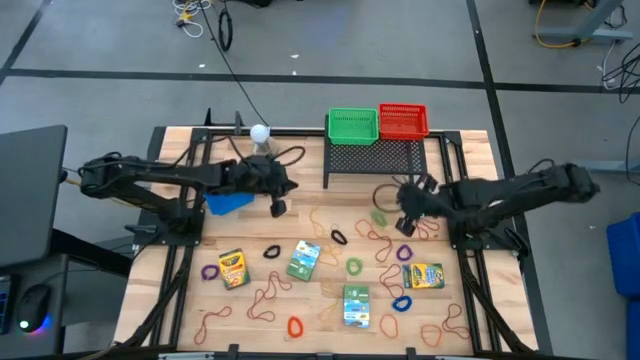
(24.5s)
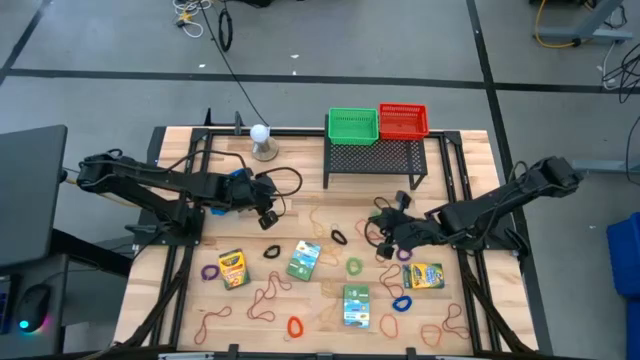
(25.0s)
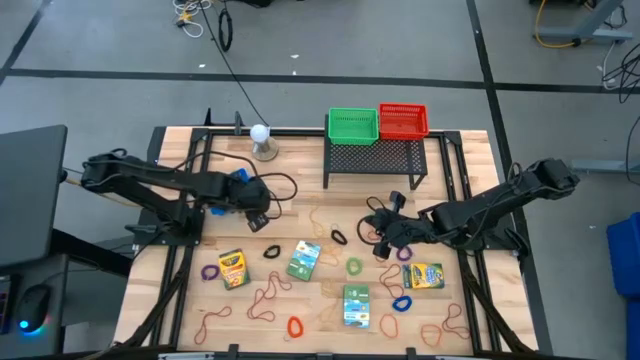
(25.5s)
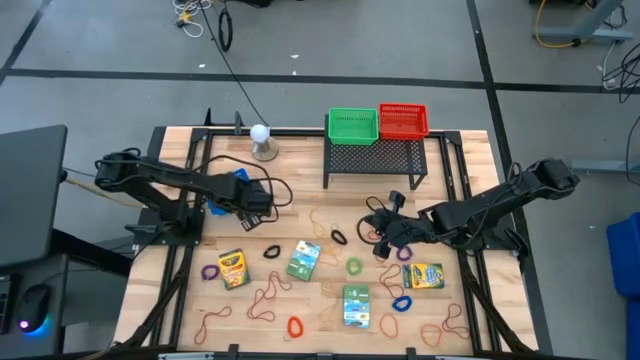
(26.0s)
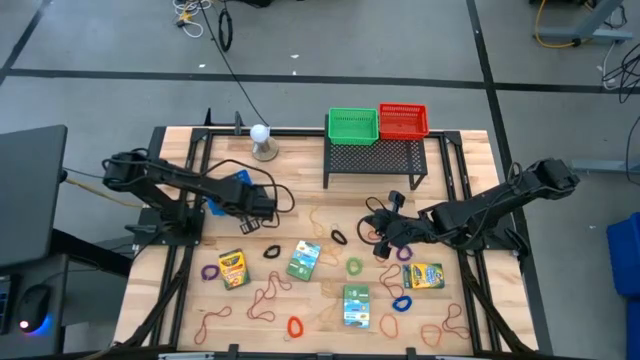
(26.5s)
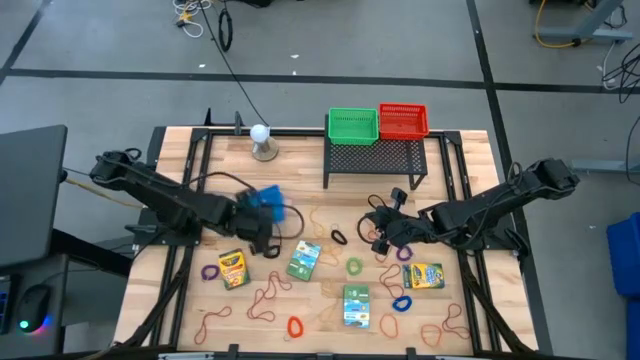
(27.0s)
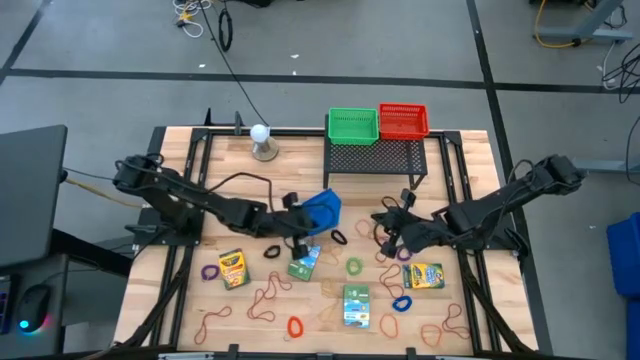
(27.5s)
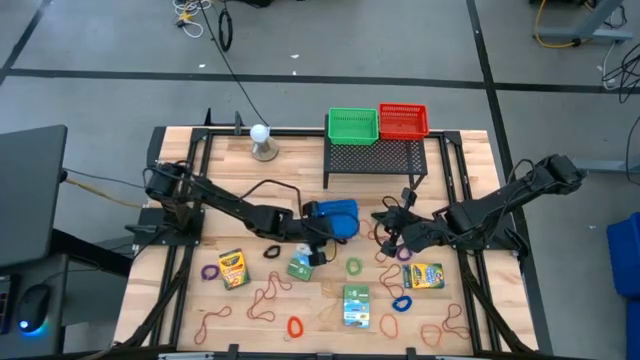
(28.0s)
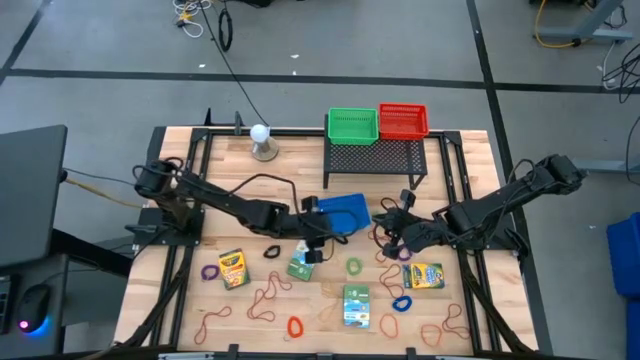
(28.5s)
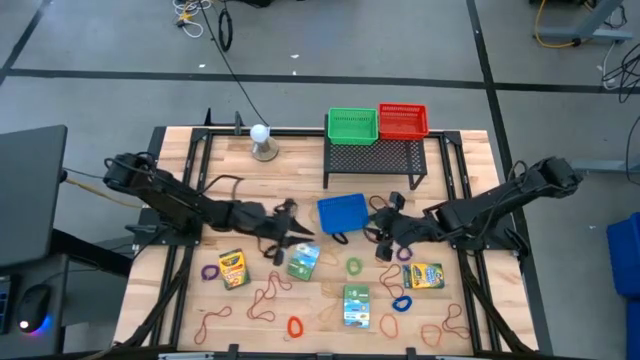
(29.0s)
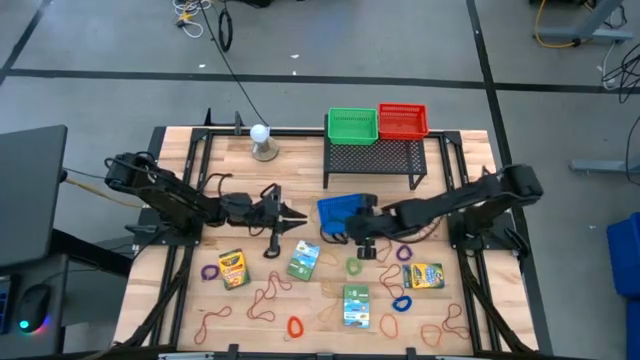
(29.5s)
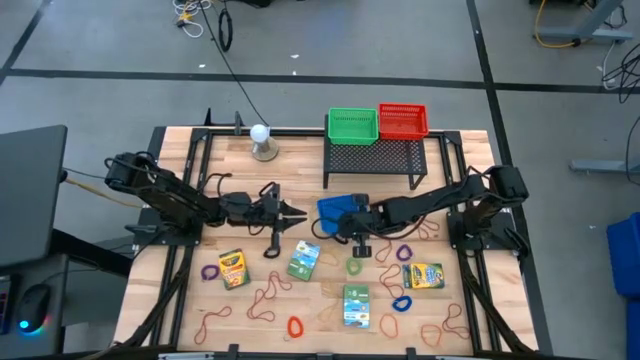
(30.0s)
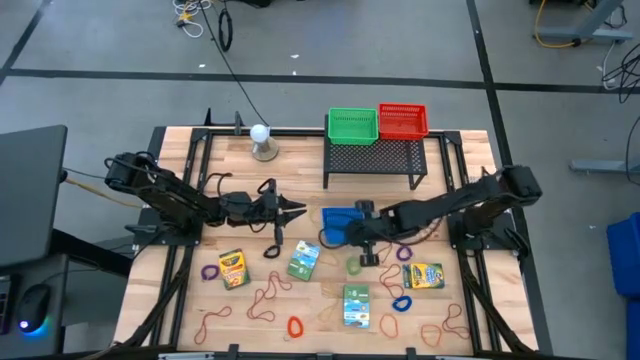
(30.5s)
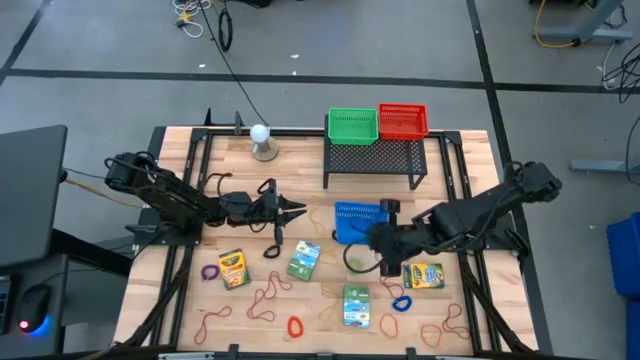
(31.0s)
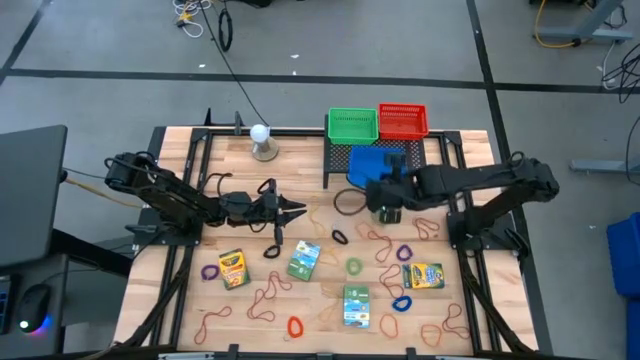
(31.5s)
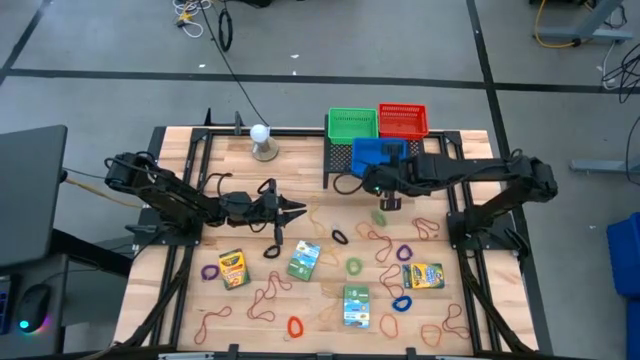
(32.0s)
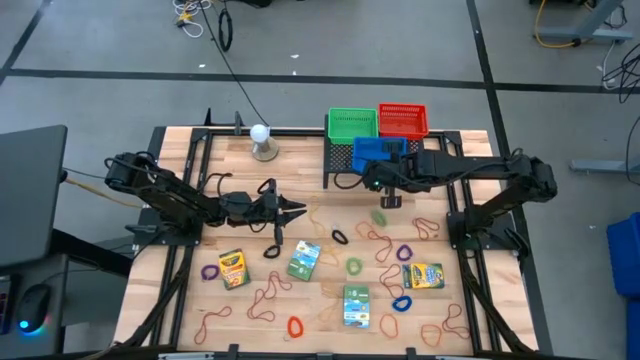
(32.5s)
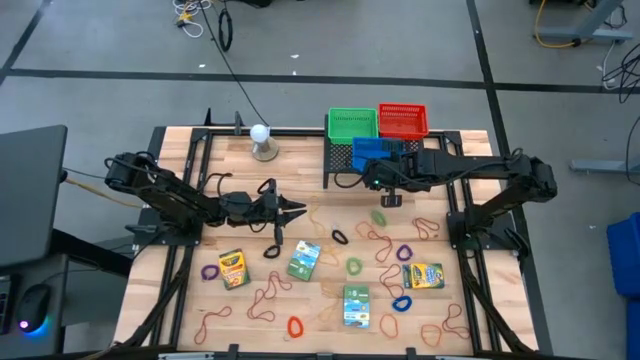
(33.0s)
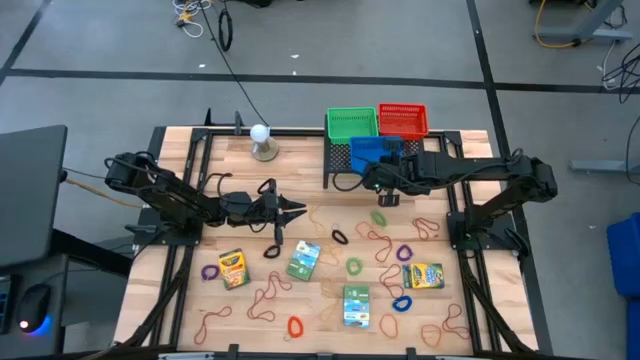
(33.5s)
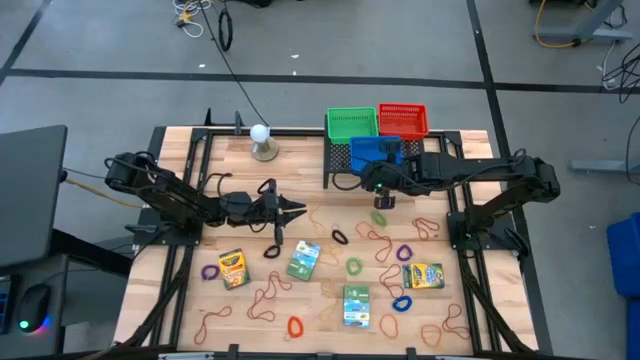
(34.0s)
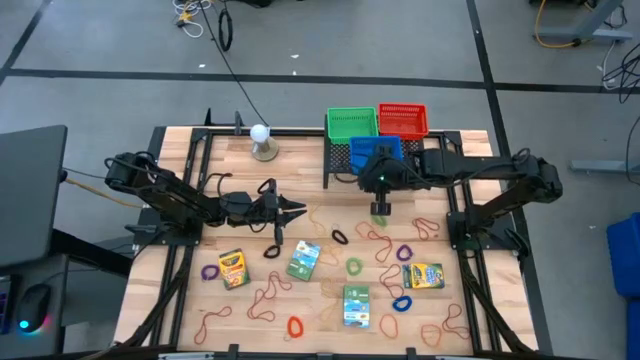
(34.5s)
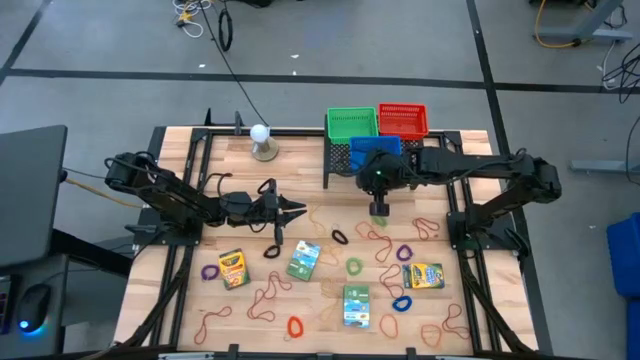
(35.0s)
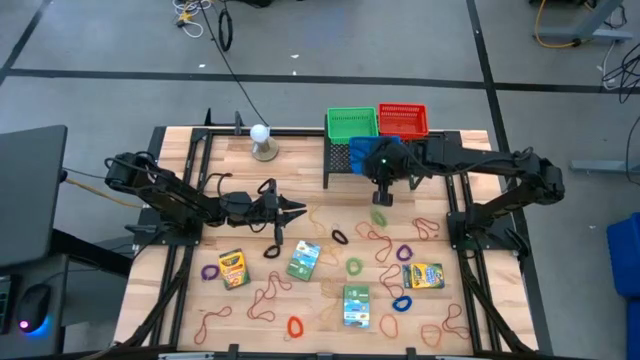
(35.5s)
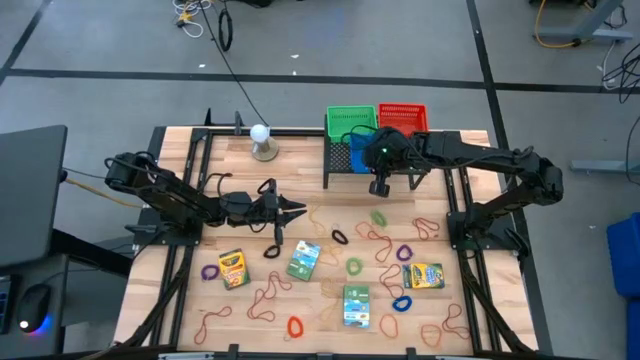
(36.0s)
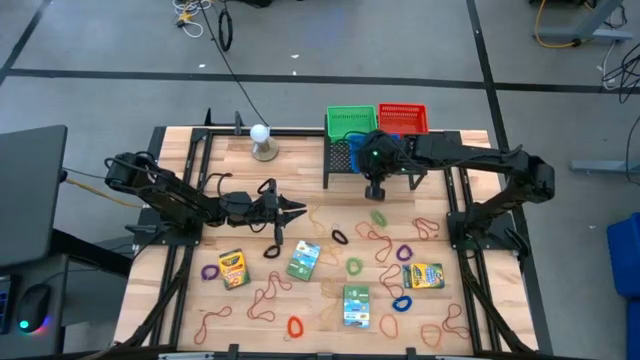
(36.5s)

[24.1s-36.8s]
Task: Pick & Place Office Desk Supplies
Put the blue bin on the shelf

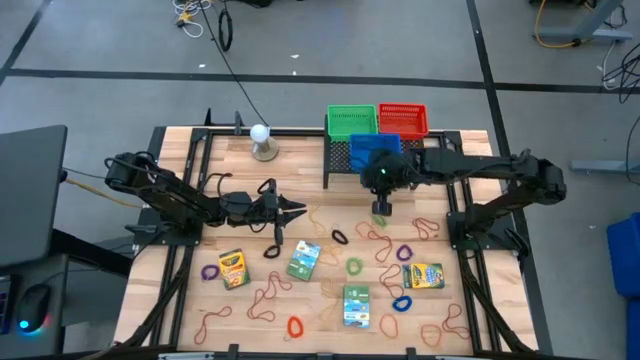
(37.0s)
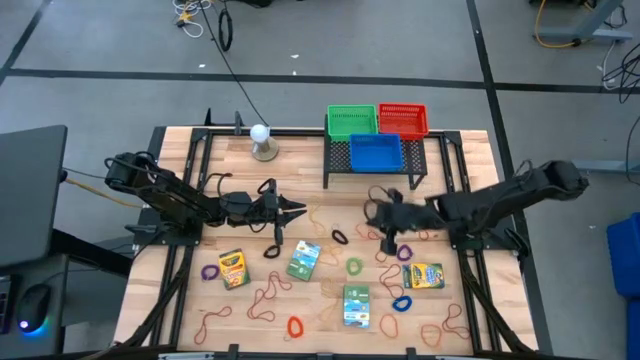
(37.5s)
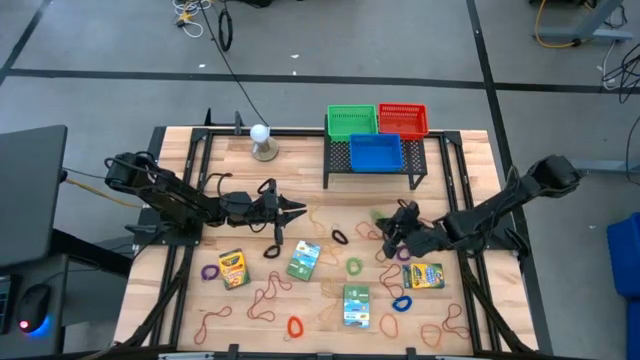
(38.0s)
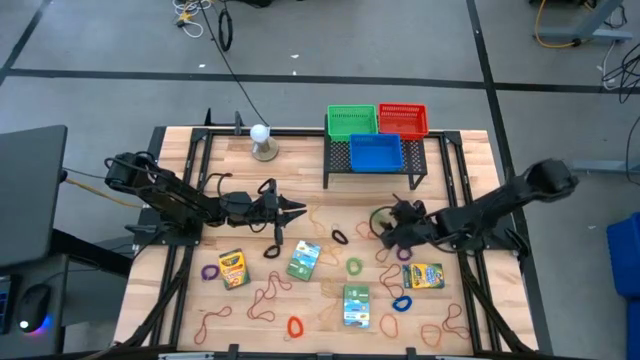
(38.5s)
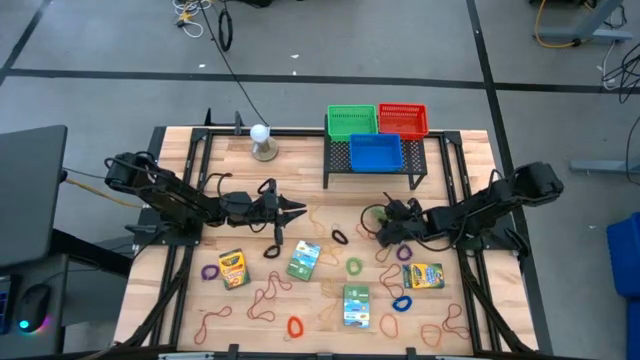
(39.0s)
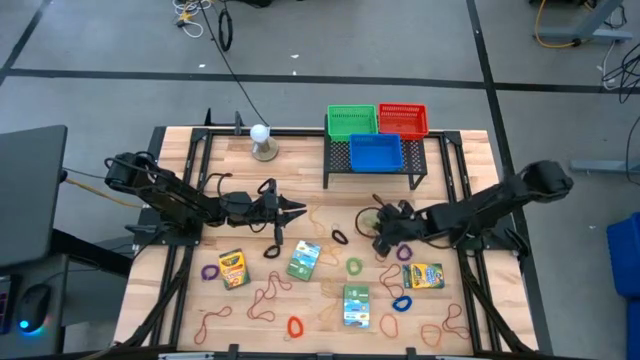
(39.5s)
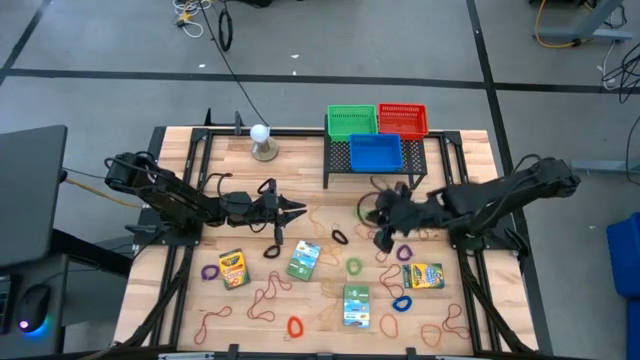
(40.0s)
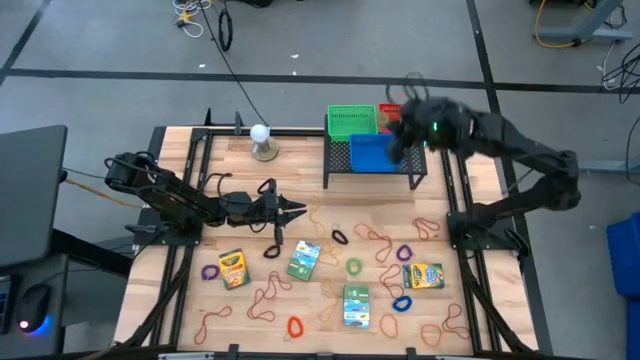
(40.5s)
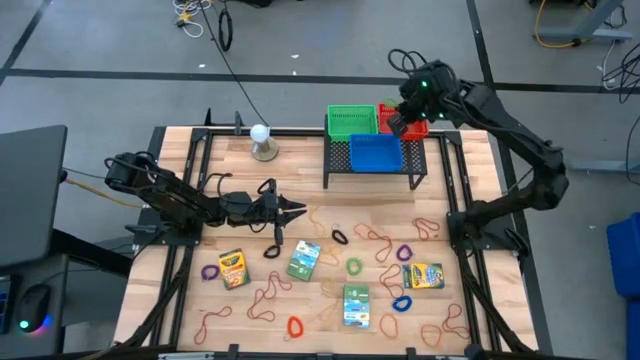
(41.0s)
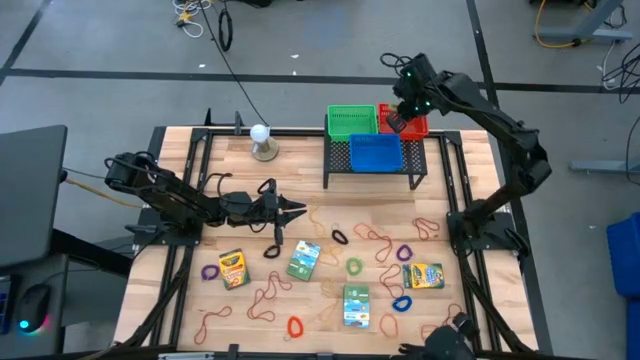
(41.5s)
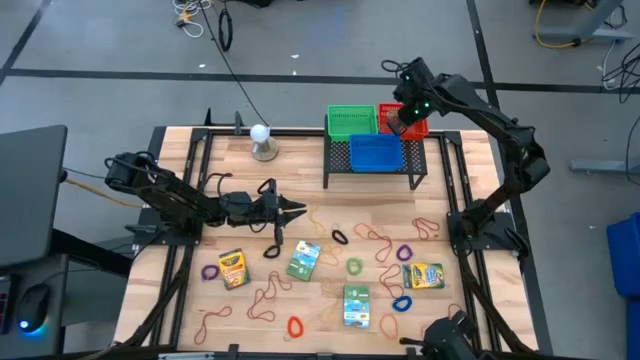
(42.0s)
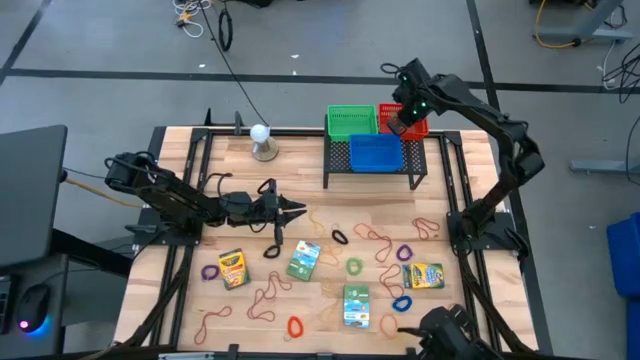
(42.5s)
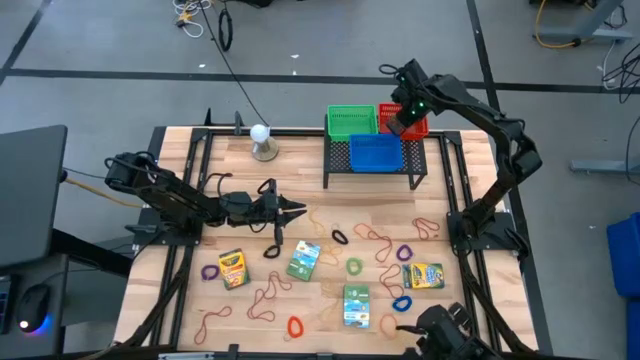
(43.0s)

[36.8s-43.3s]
Put the green spiral keychain into the red bin

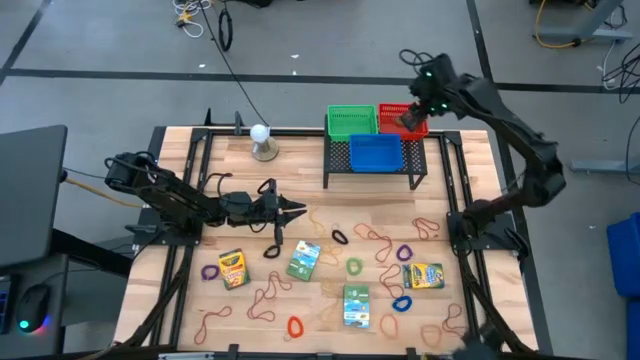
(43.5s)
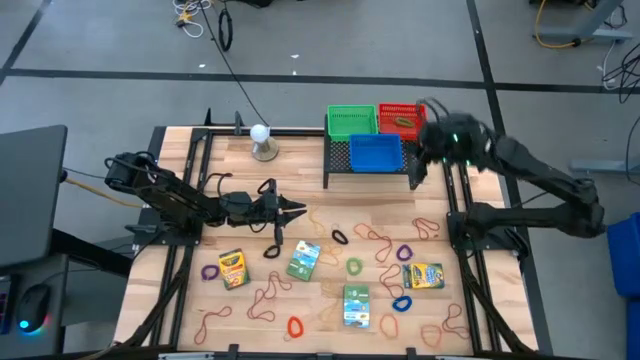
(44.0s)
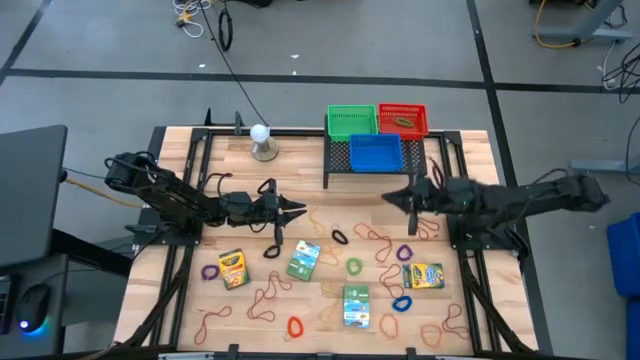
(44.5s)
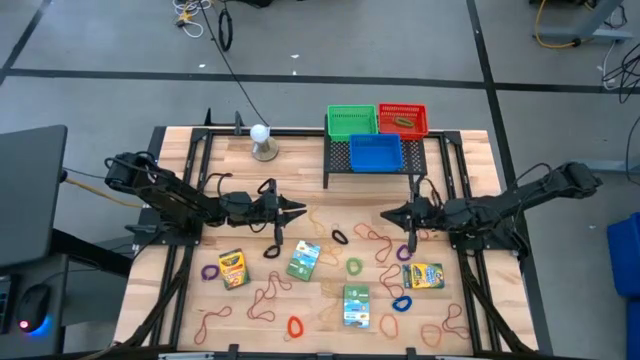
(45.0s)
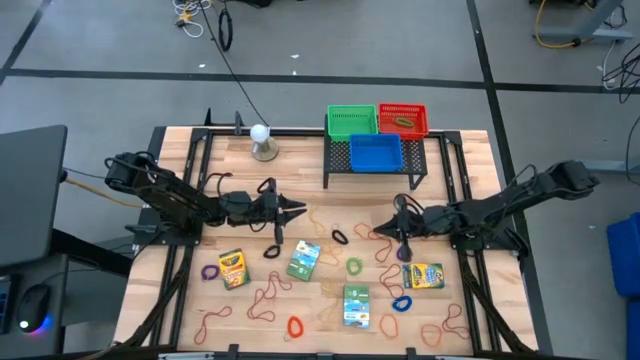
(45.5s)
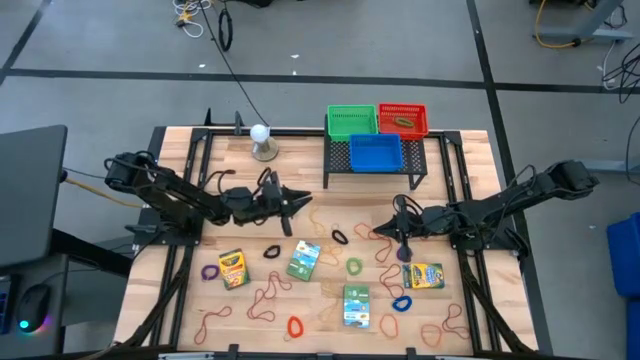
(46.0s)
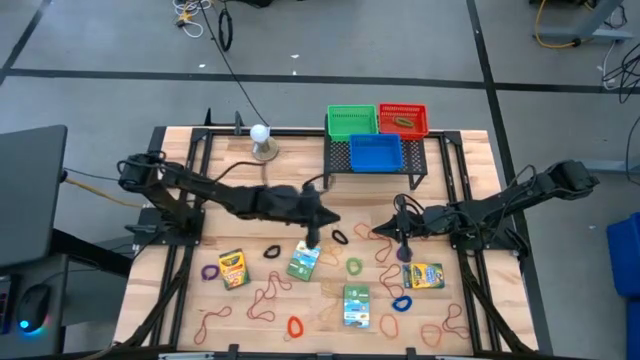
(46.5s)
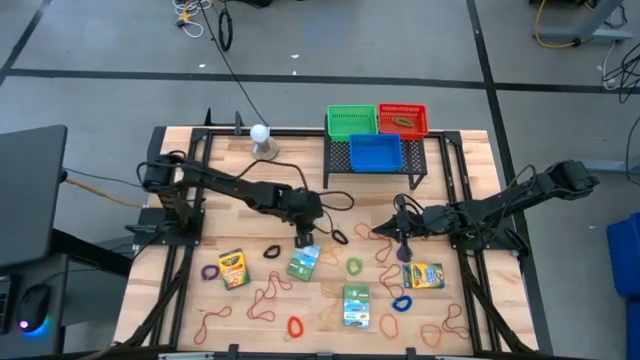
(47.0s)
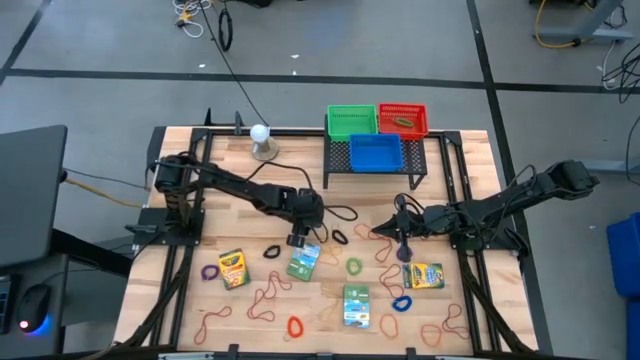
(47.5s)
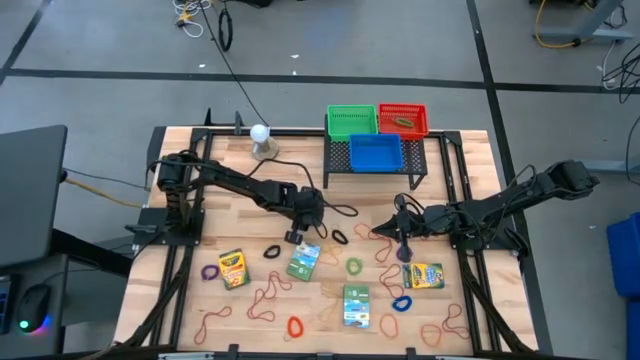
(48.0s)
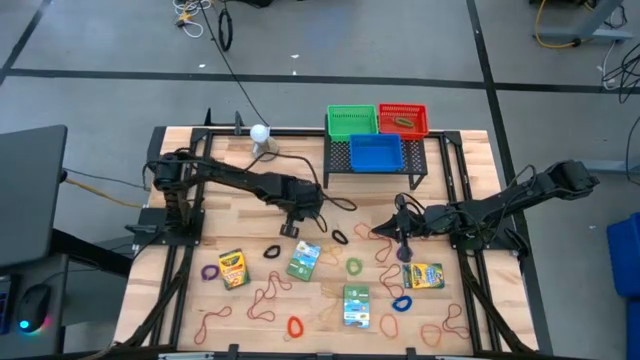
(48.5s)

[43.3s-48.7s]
Put the yellow rubber band into the green bin
